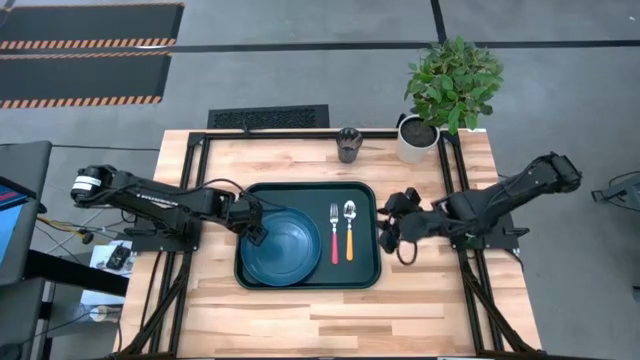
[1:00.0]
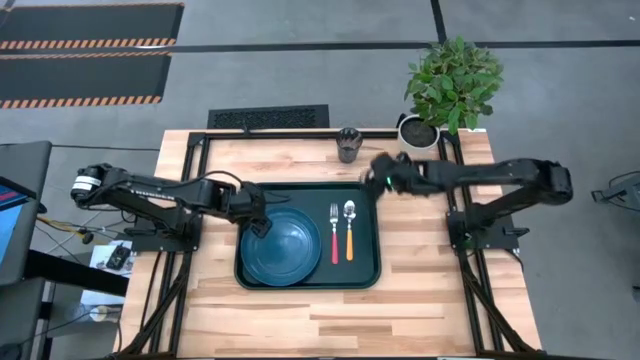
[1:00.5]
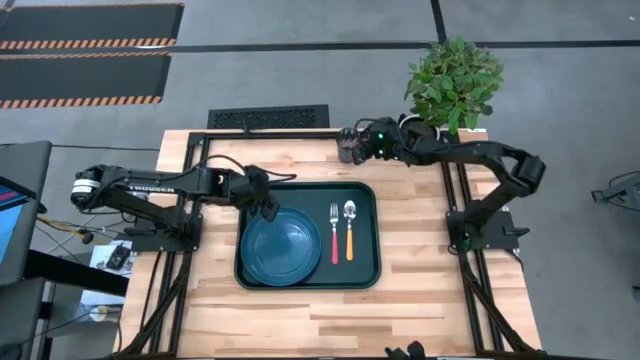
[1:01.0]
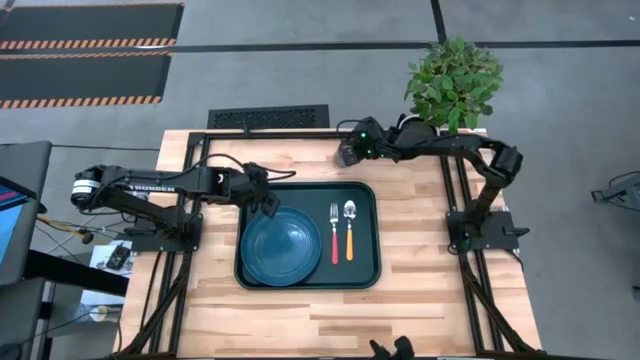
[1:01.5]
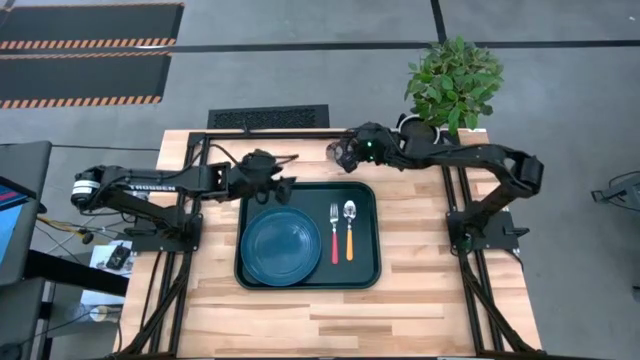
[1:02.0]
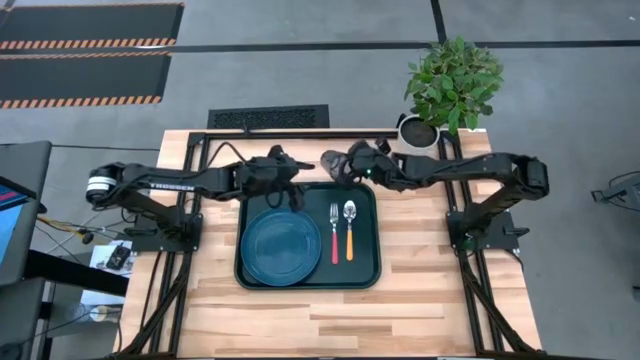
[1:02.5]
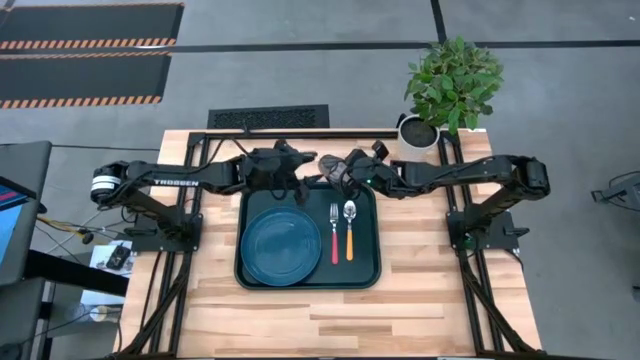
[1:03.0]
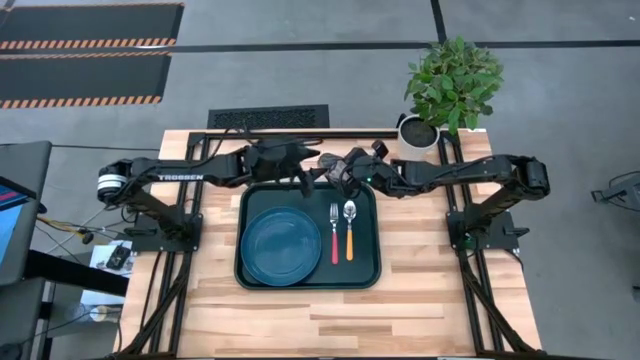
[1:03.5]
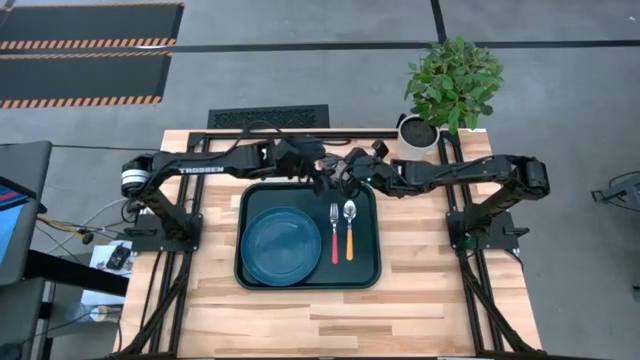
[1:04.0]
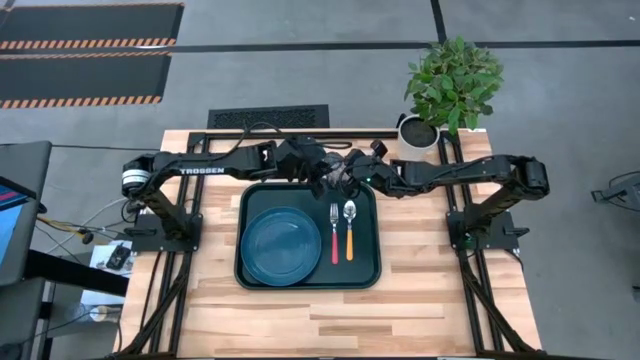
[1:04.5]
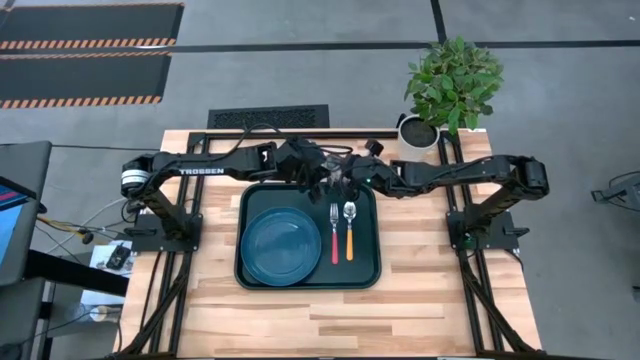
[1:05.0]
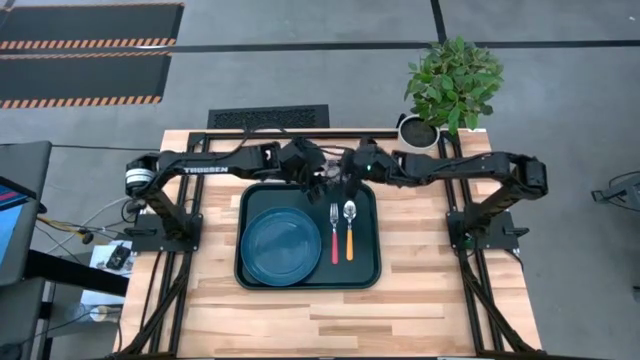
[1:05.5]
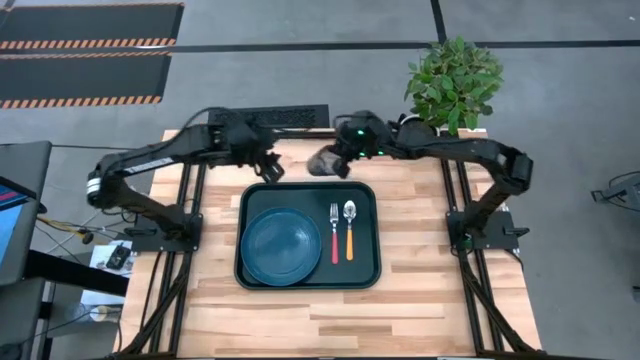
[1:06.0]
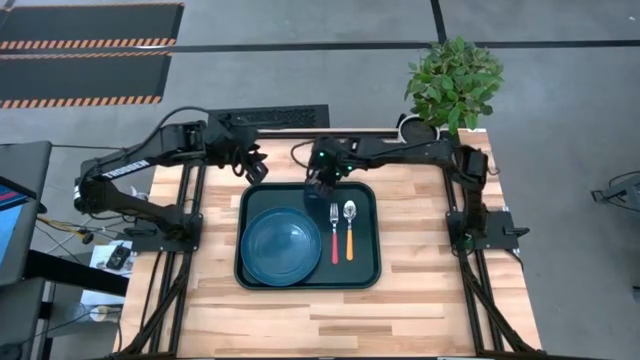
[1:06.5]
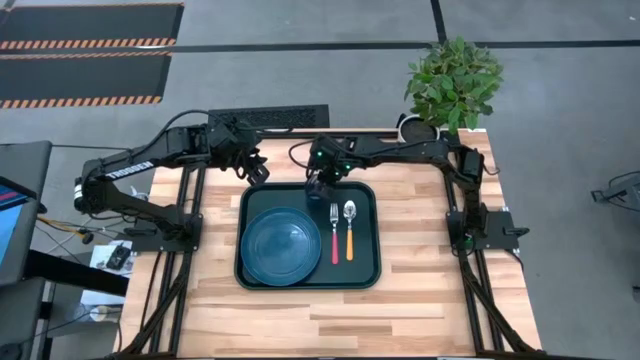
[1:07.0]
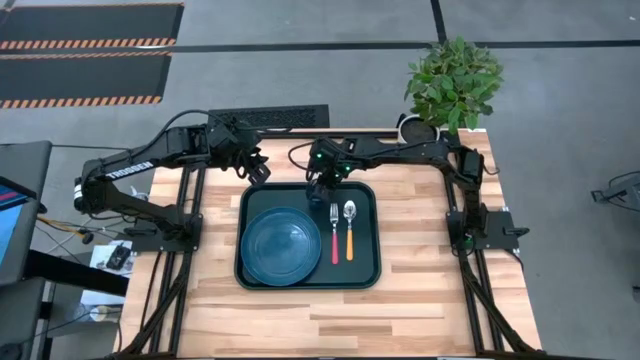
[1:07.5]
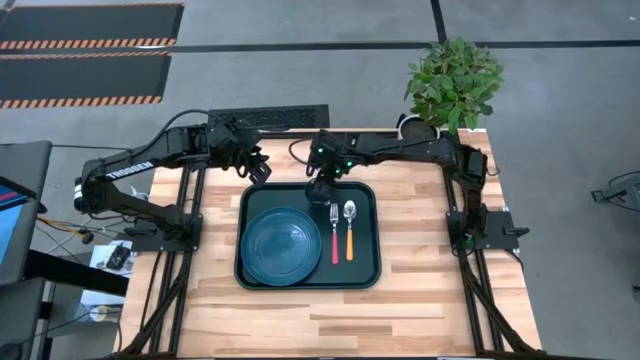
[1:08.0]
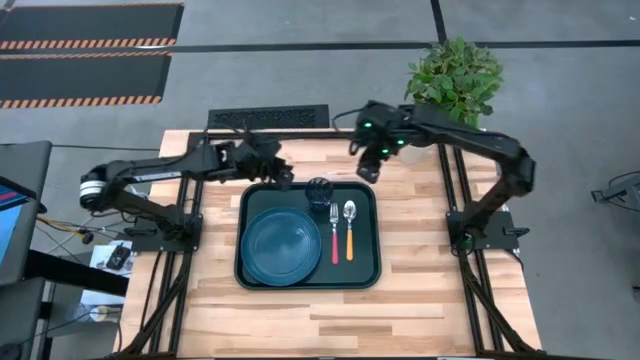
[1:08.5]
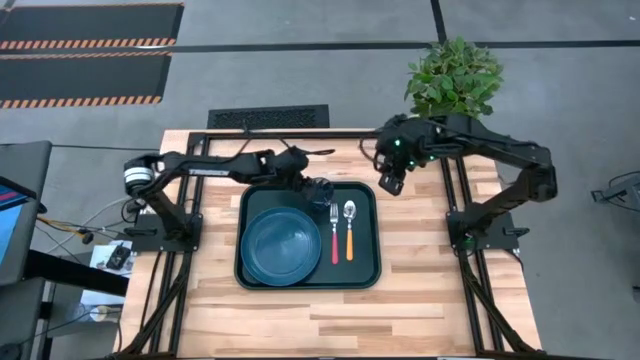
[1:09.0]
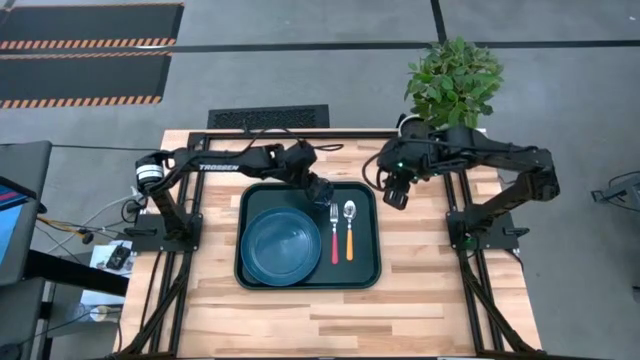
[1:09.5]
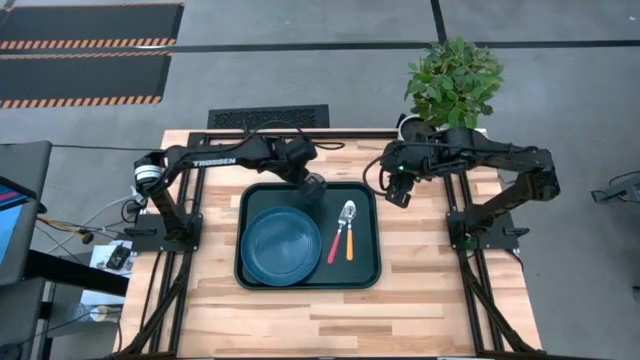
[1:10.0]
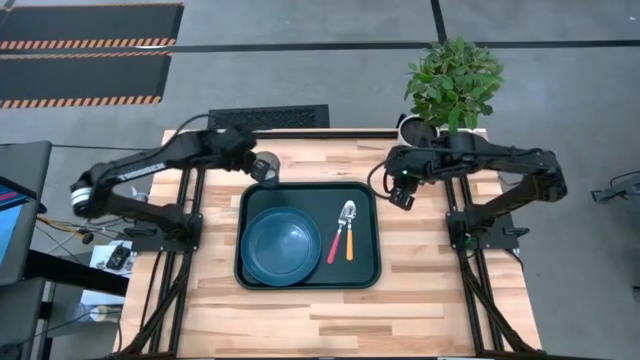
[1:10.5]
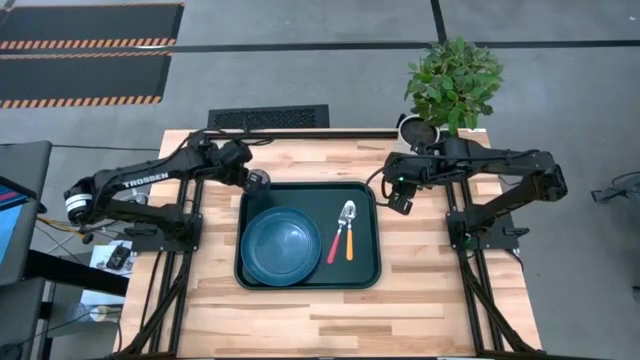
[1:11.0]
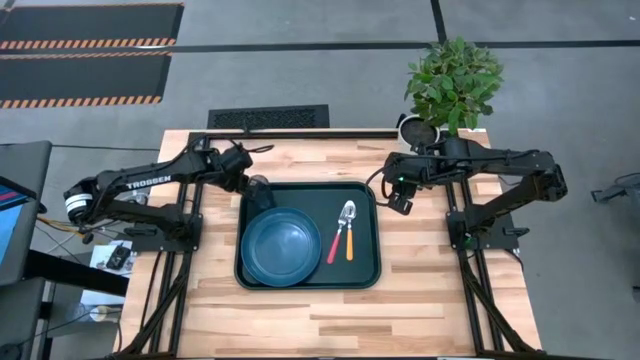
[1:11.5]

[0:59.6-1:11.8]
Task: Pick and place plate/cup/fork/spoon on tray
Put the dark blue cup on the black serving tray

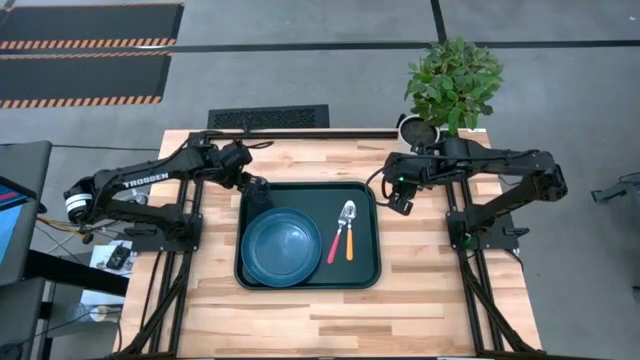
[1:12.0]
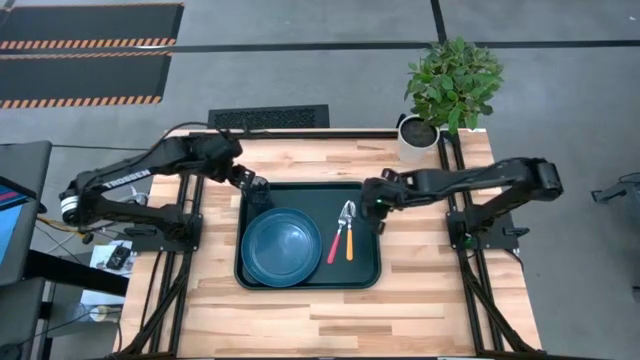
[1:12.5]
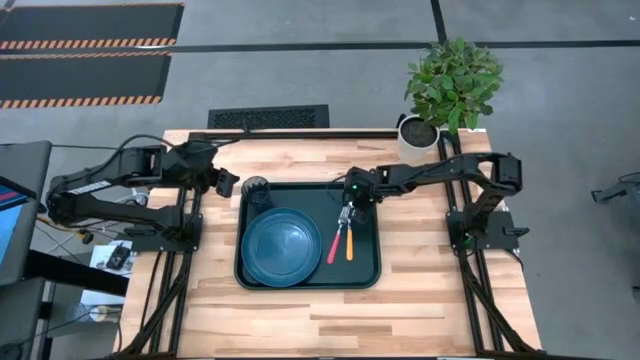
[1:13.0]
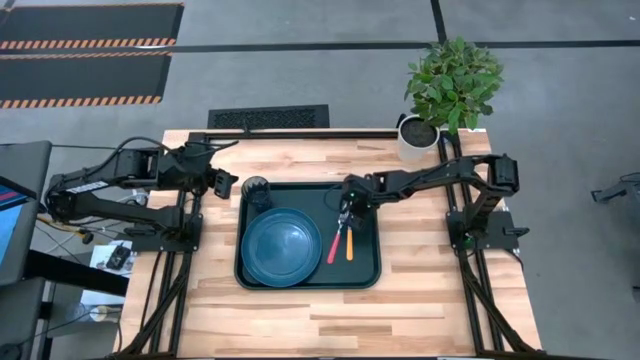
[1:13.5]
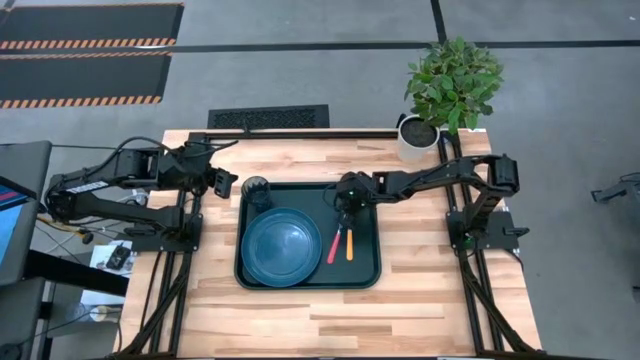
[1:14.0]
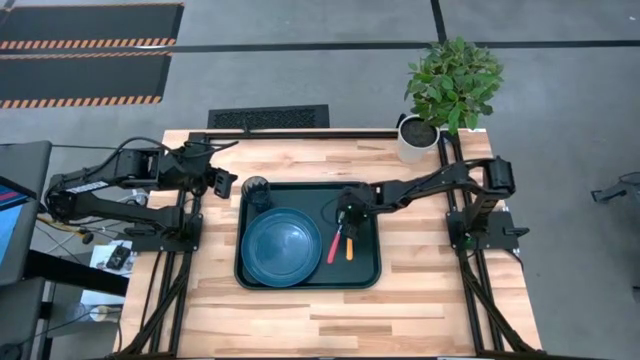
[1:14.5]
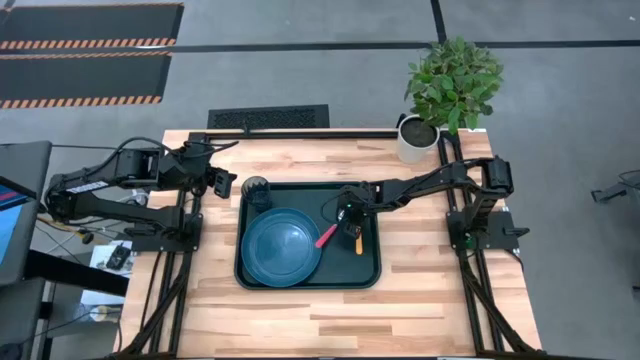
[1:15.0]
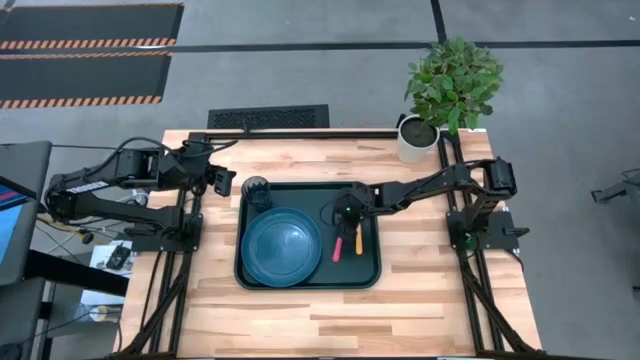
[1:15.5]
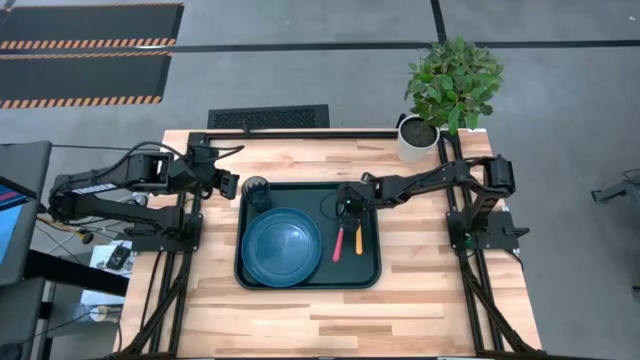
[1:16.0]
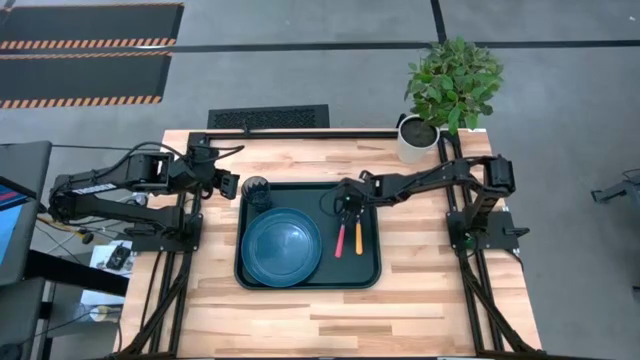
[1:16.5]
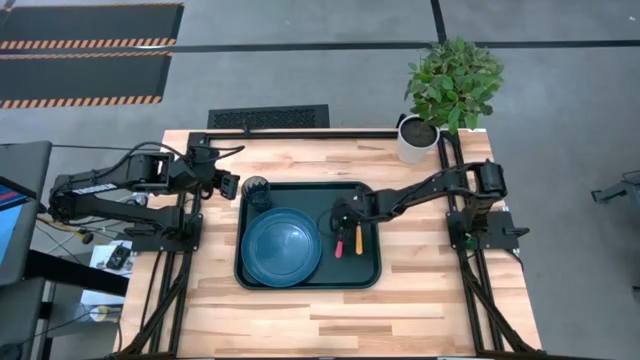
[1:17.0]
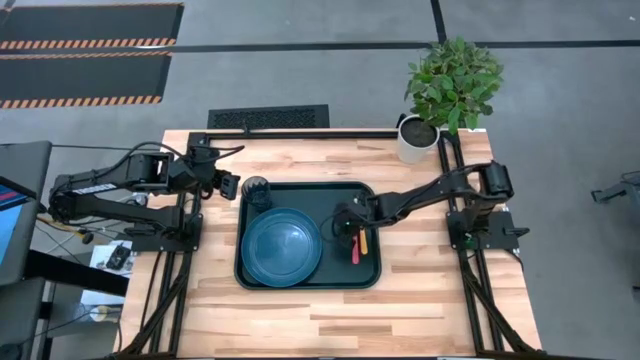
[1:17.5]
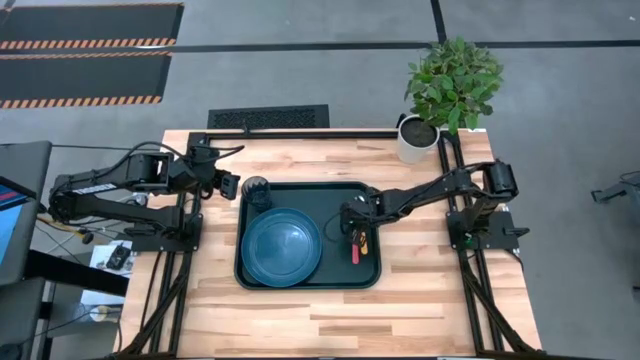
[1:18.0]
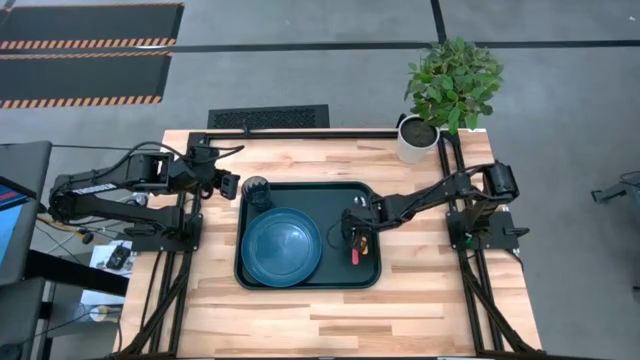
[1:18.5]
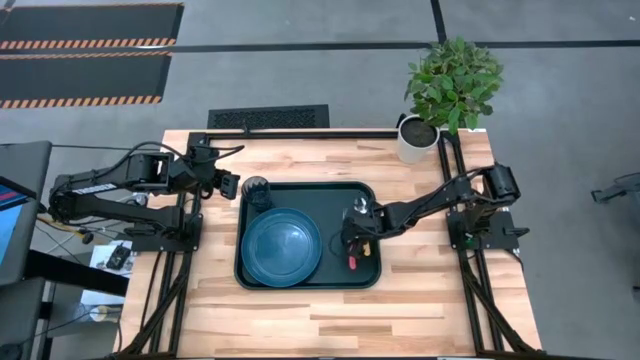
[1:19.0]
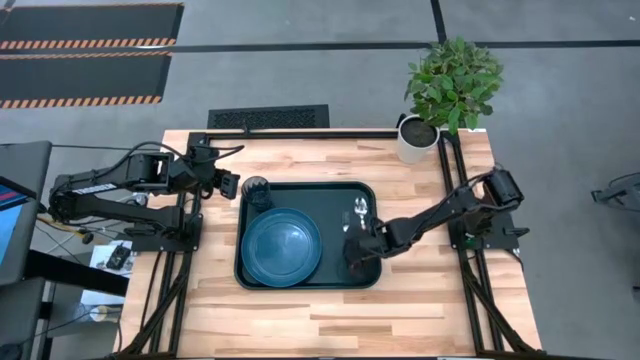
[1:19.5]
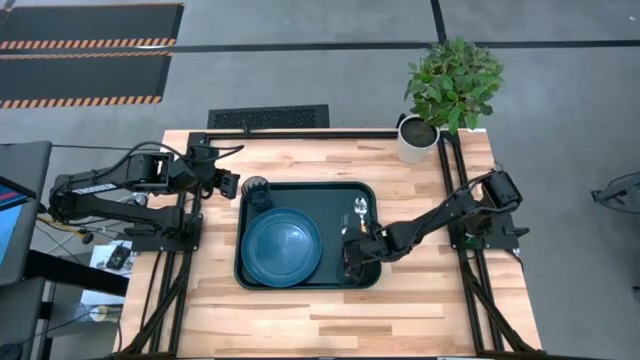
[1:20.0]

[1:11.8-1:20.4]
Adjust the pink fork on the black serving tray
